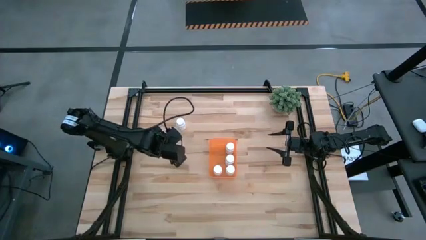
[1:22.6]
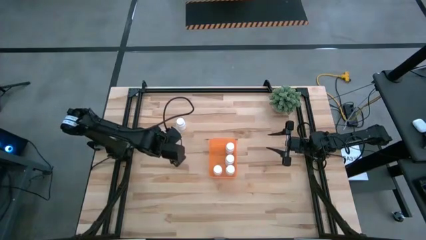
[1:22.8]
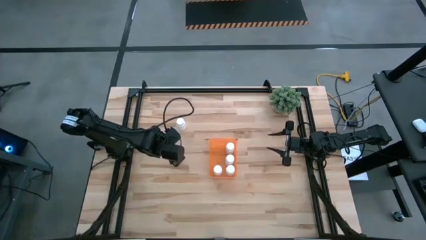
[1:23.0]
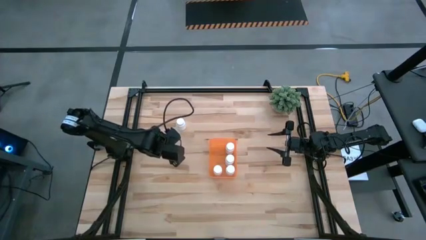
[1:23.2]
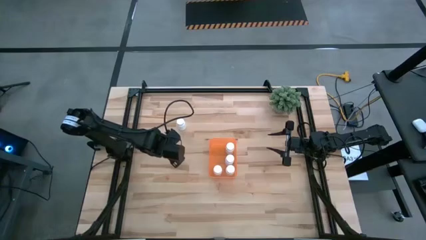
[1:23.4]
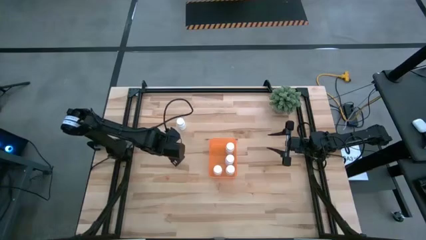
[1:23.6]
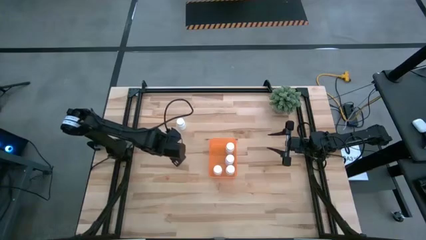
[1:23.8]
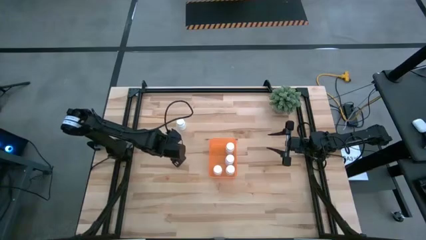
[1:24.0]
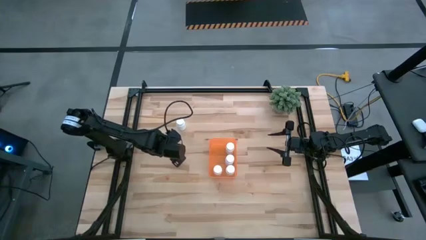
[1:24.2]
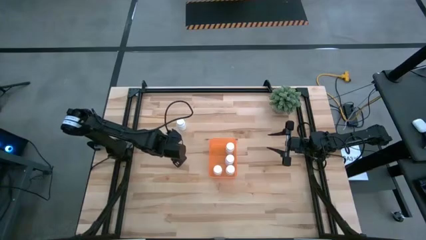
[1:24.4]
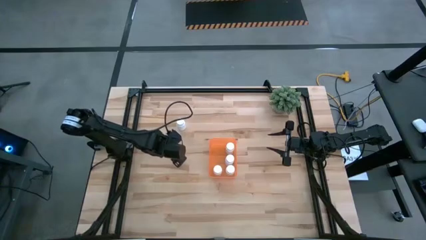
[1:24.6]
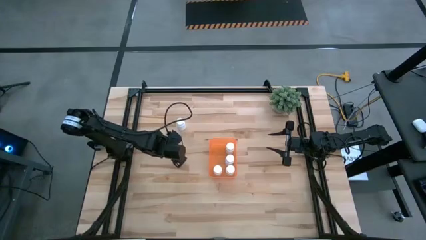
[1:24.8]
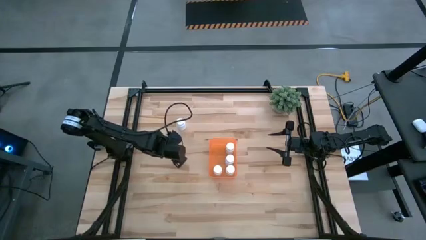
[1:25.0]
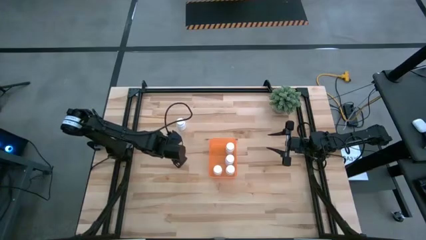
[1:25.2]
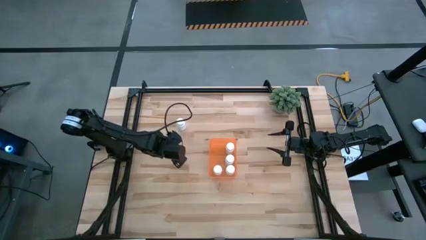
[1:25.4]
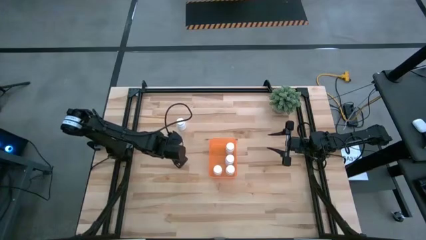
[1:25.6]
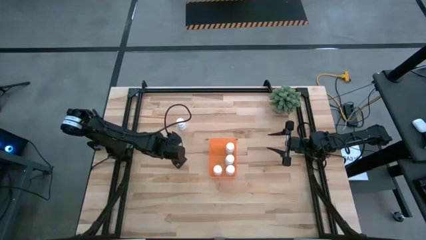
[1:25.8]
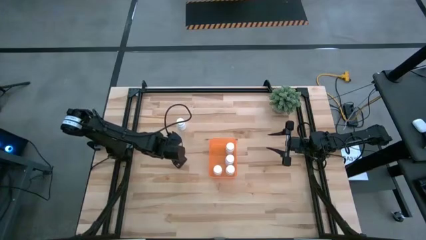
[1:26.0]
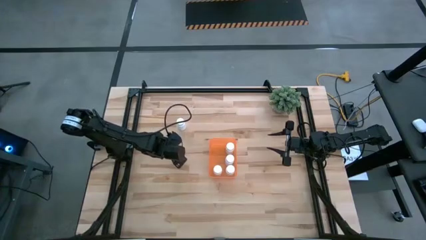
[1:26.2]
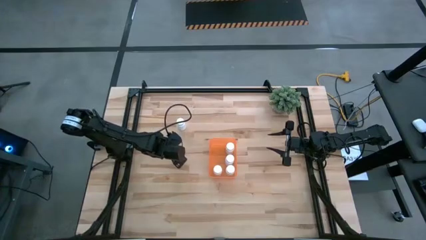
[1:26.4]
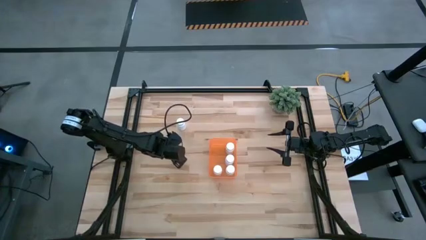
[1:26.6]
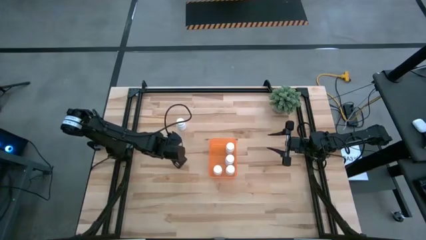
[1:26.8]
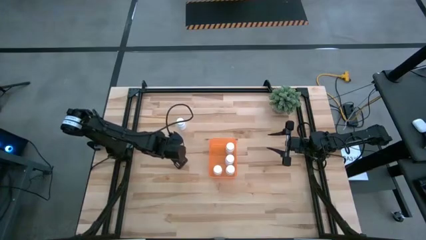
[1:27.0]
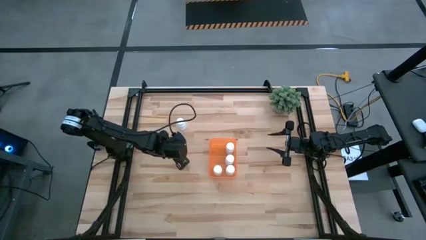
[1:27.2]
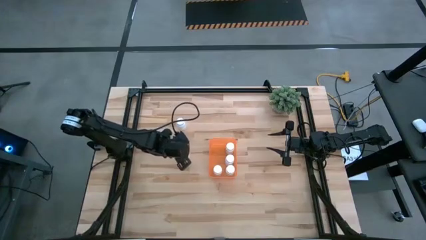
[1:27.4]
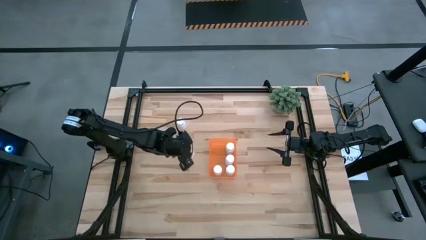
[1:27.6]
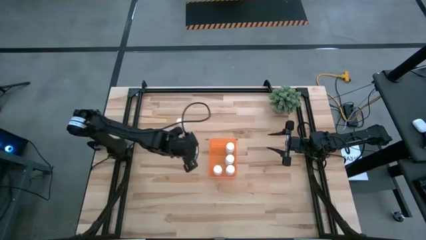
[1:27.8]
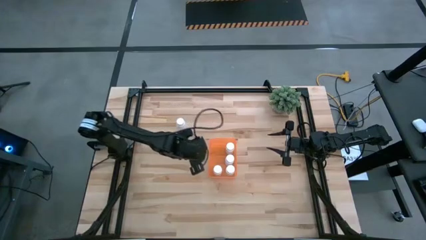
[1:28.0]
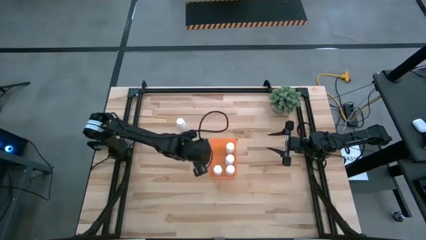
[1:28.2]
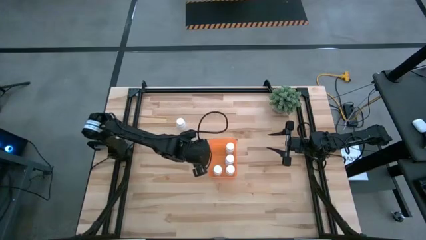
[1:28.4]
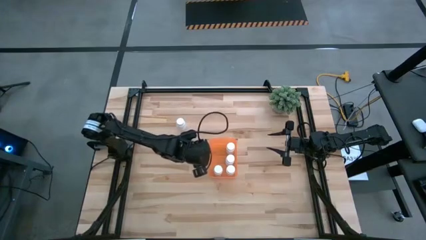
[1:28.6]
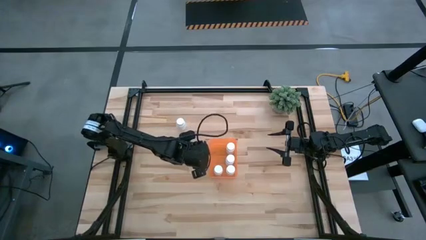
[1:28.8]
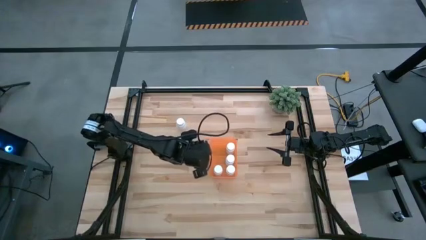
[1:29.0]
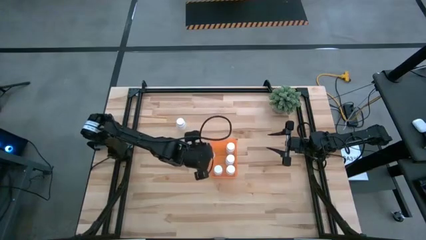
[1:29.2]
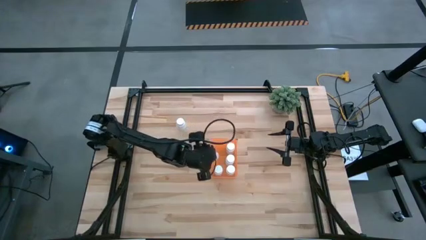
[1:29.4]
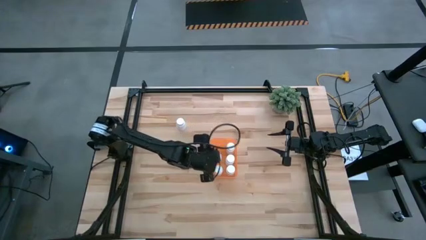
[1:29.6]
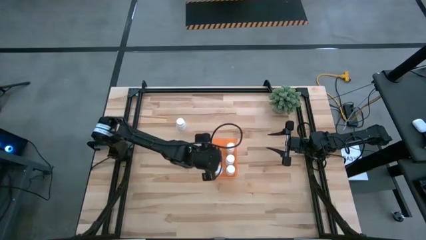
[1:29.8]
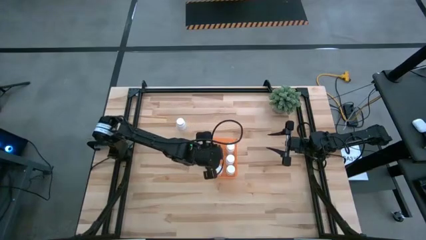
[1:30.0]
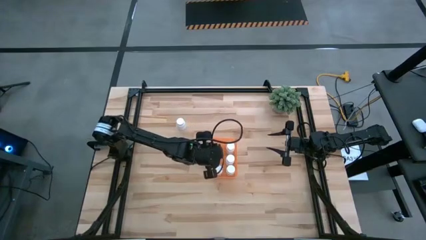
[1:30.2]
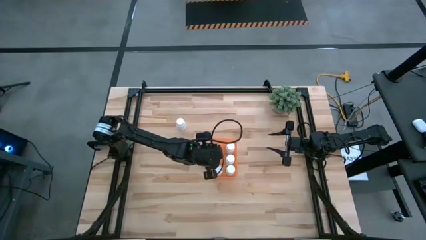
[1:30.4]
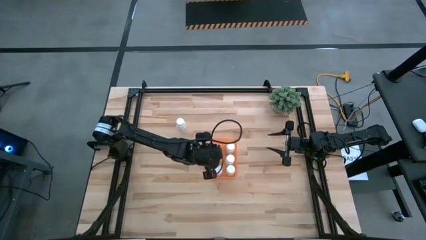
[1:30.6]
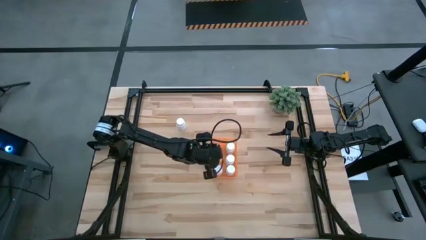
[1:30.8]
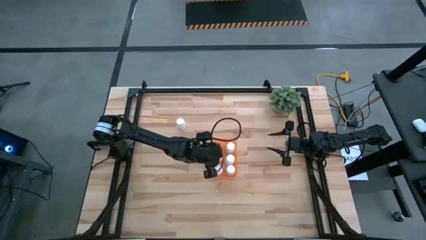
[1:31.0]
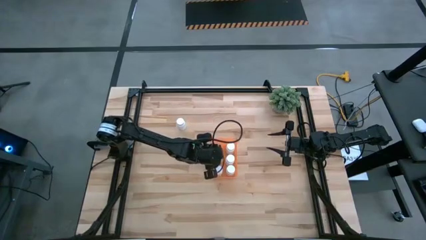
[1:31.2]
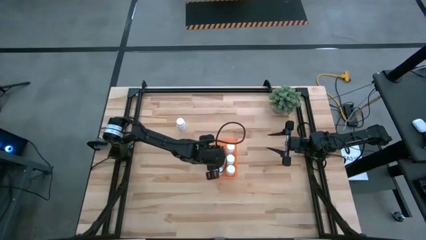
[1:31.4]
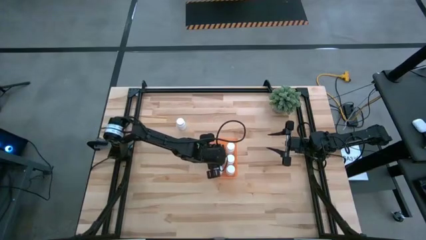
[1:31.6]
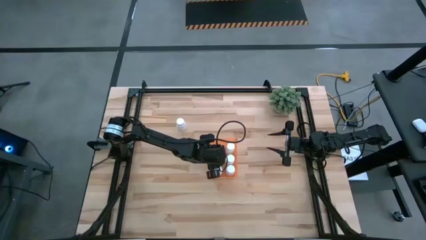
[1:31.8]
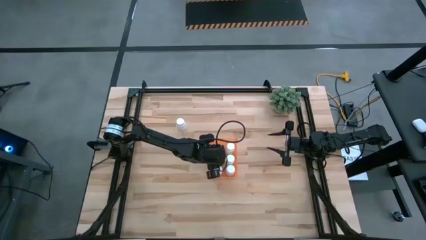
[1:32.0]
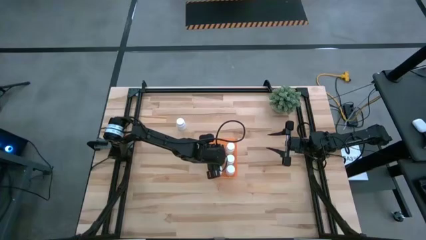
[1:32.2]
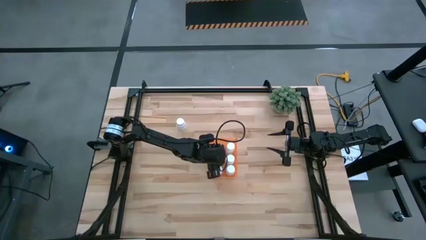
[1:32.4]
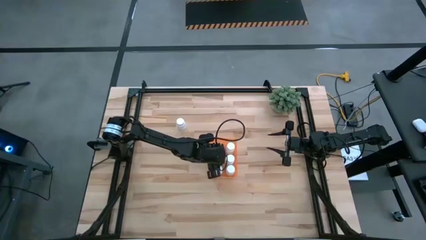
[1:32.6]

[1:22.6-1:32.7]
Task: Pick and place pill bottles into a basket
Put the white pill bottle into the orange bin

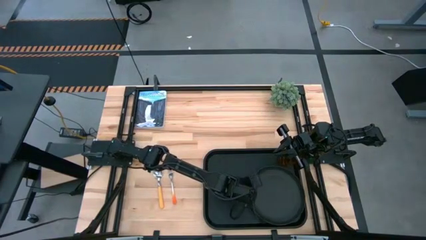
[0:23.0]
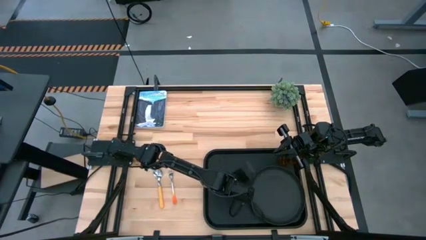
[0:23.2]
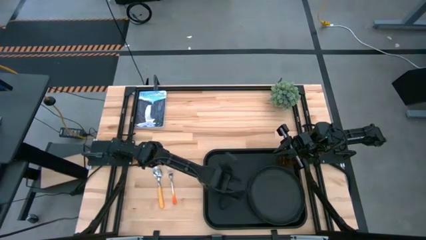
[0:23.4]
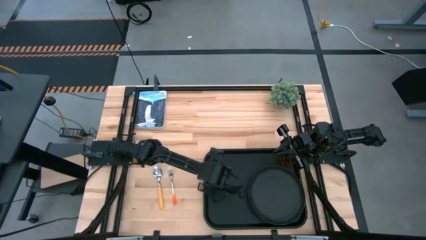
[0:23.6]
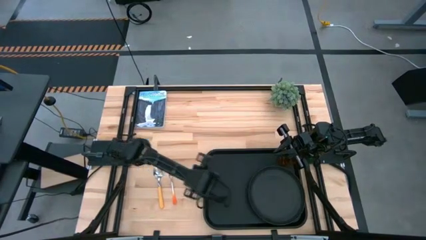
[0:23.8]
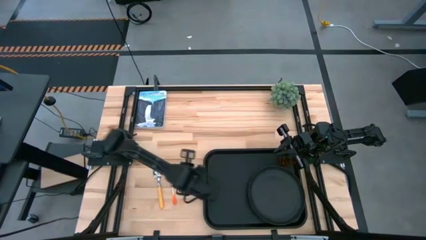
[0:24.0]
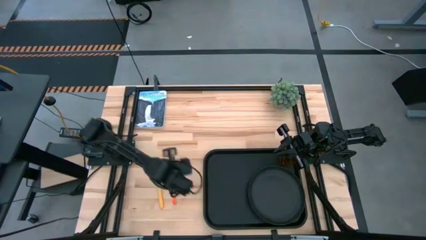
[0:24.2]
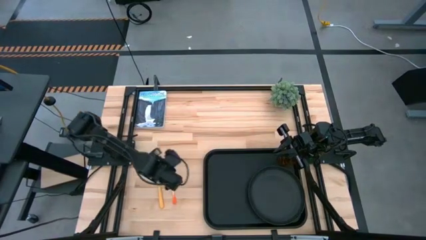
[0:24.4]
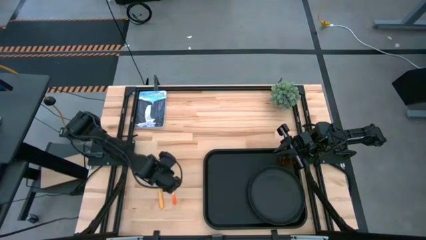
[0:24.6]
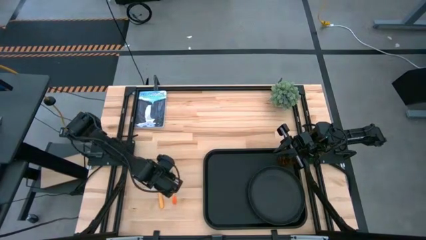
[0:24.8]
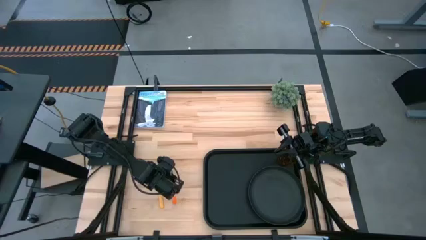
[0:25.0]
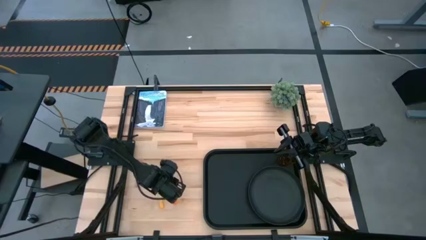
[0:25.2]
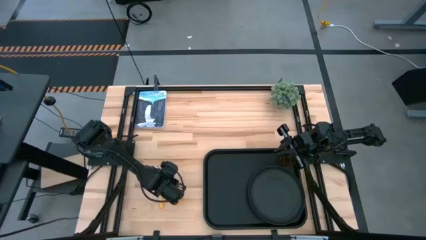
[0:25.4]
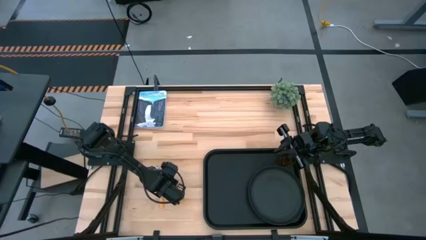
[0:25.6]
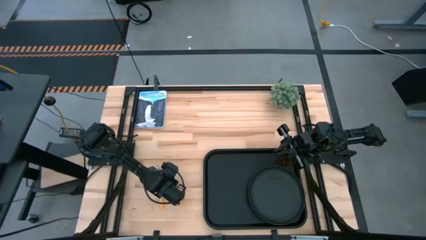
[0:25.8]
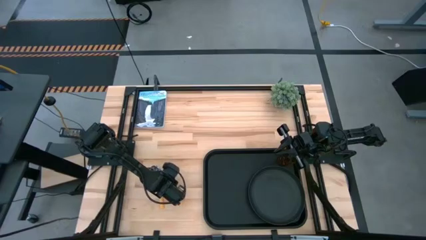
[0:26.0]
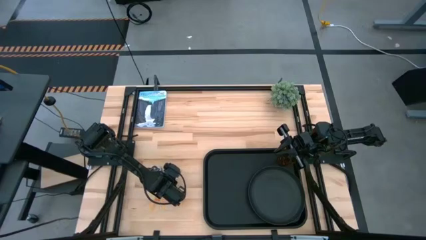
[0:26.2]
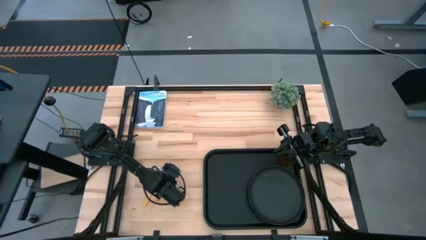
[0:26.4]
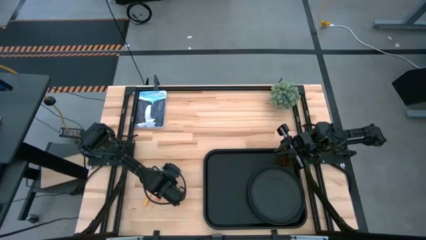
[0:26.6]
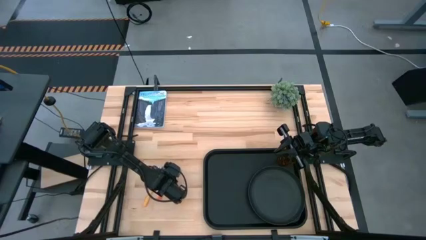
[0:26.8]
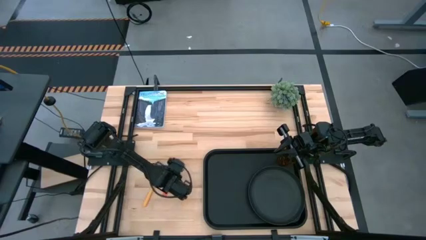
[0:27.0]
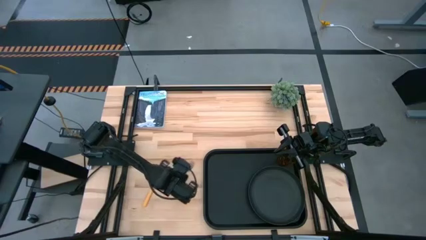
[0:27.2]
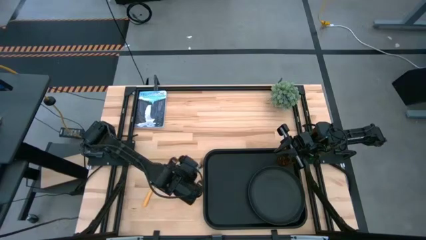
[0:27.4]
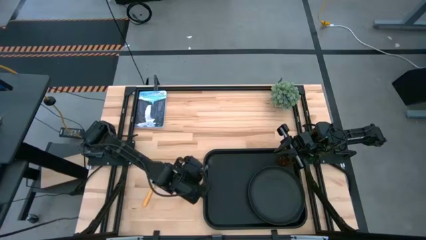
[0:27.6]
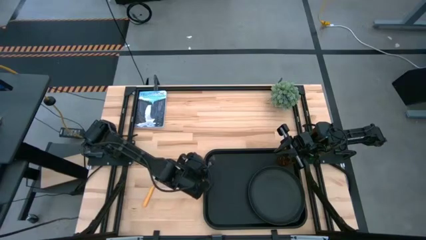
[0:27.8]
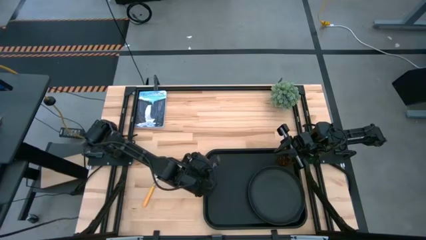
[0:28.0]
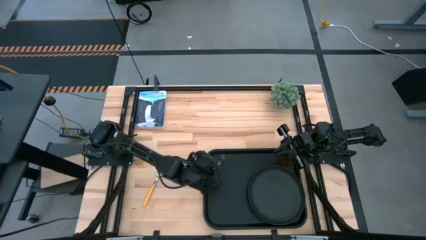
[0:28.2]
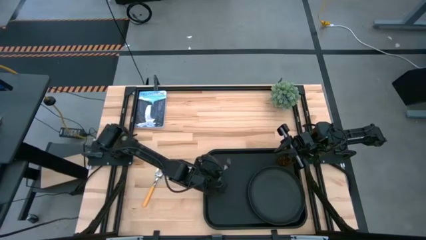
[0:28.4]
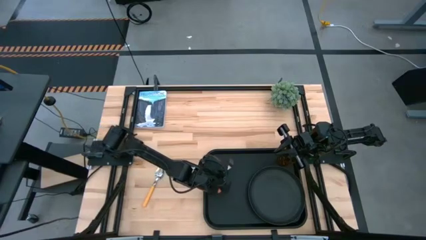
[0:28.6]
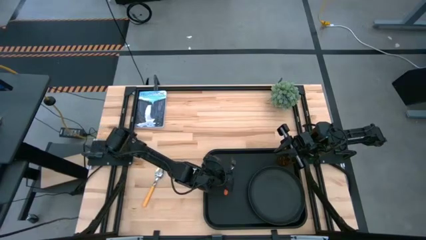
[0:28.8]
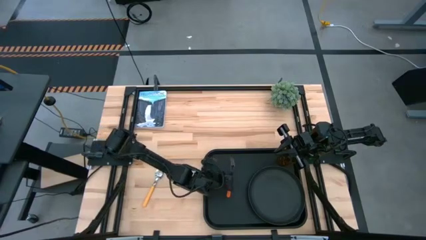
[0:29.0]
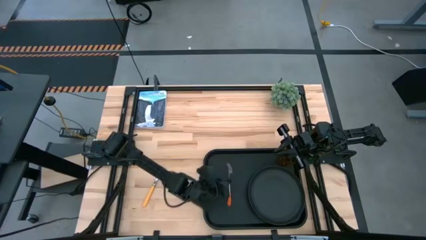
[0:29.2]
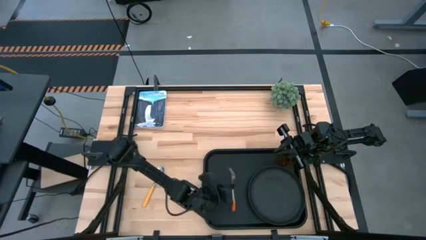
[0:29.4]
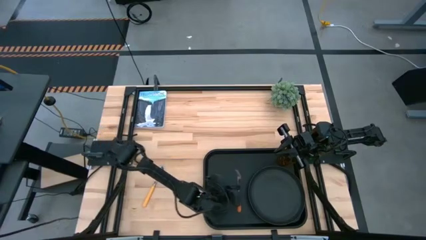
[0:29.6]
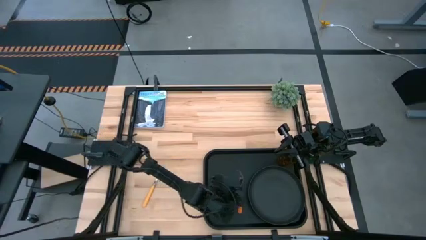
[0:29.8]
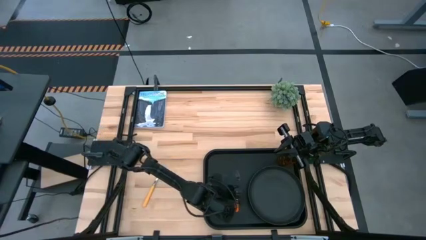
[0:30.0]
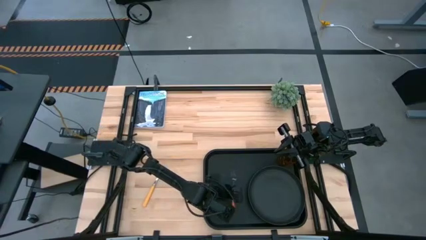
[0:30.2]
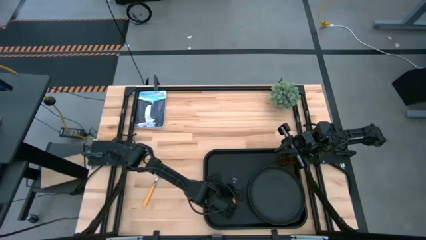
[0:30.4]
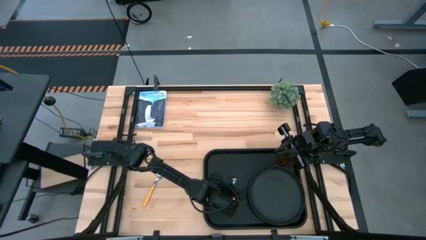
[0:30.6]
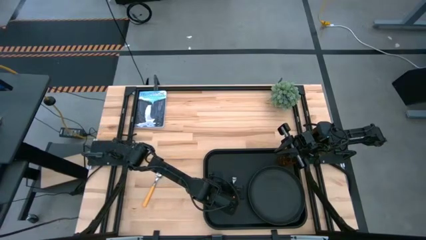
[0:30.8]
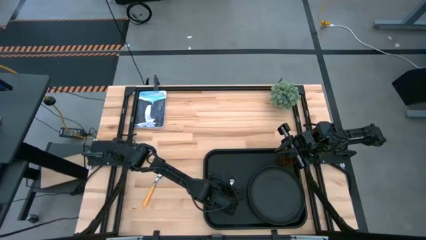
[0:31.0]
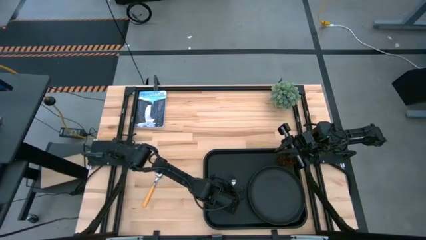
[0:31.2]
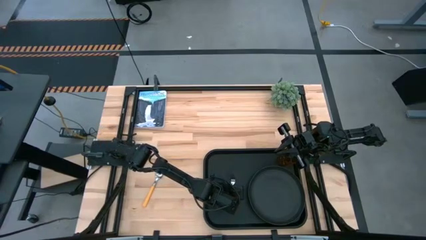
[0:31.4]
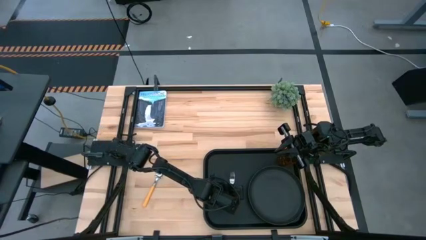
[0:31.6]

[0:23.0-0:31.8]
Task: Pick and place plate/cup/fork/spoon on tray
Put the orange fork on the black tray to the left of the black plate
